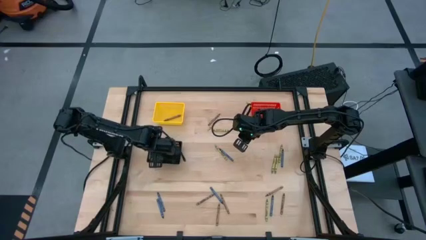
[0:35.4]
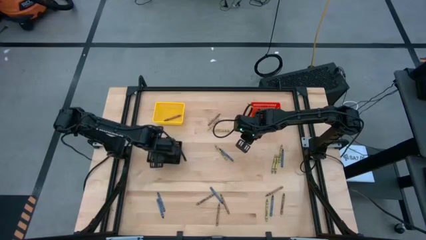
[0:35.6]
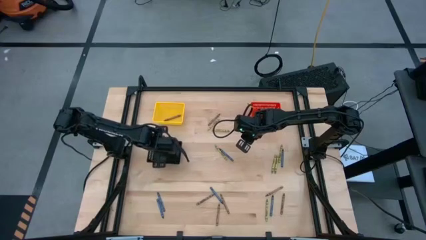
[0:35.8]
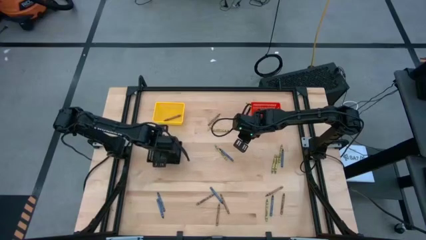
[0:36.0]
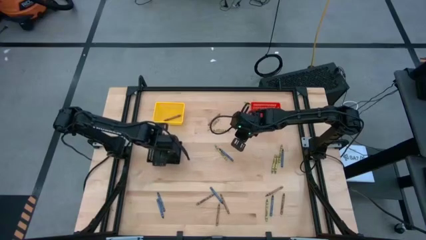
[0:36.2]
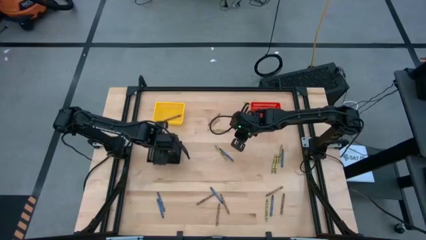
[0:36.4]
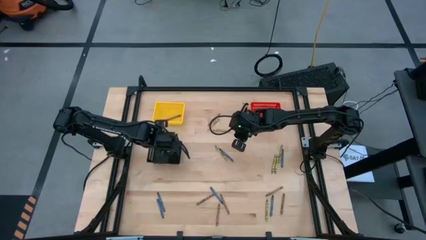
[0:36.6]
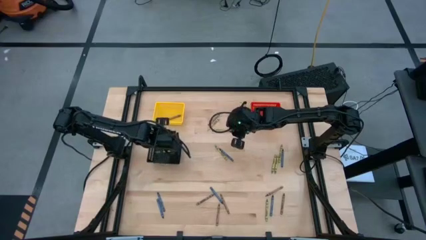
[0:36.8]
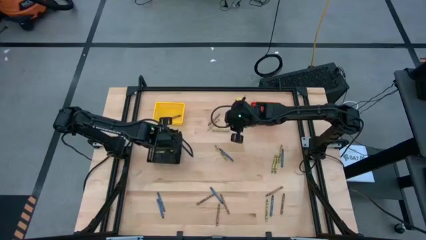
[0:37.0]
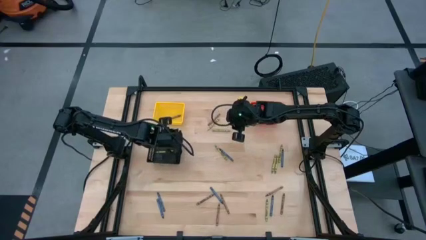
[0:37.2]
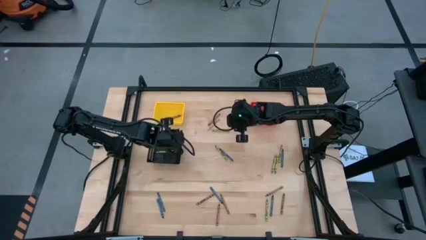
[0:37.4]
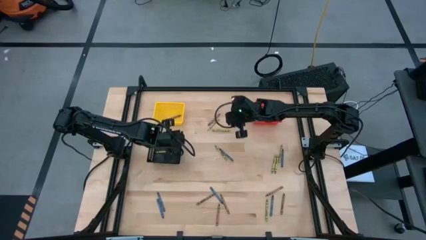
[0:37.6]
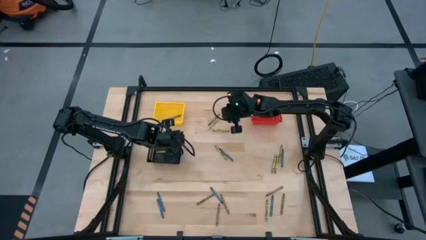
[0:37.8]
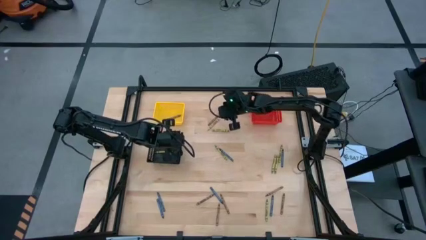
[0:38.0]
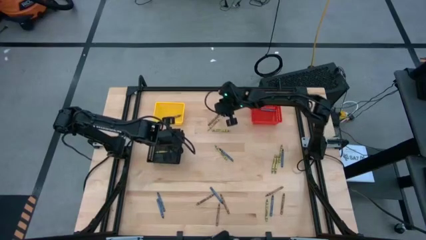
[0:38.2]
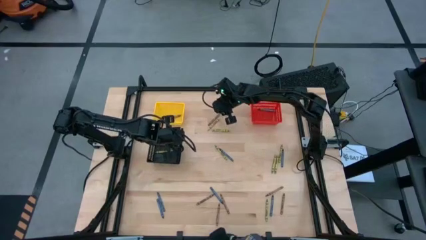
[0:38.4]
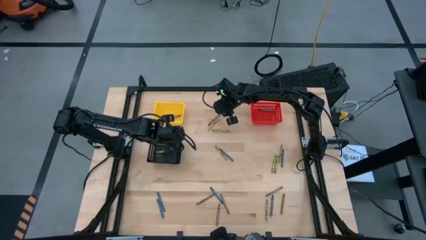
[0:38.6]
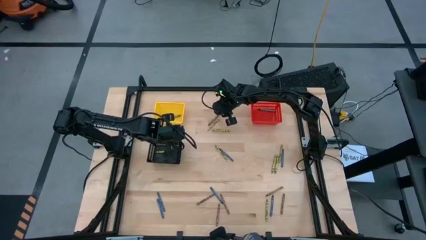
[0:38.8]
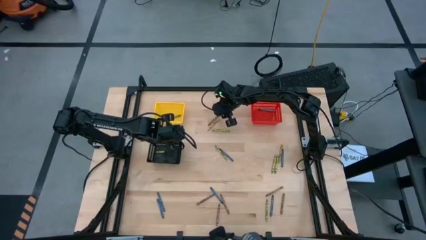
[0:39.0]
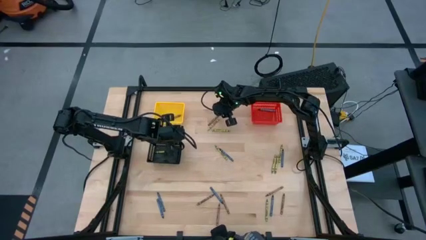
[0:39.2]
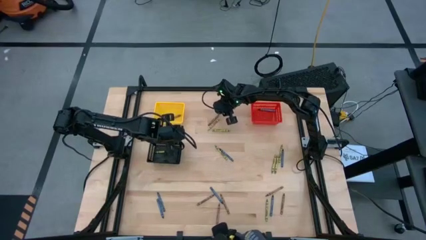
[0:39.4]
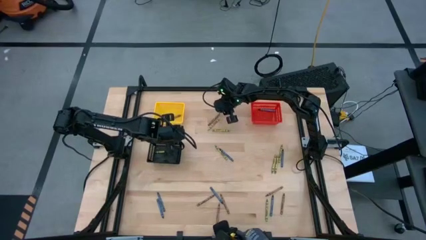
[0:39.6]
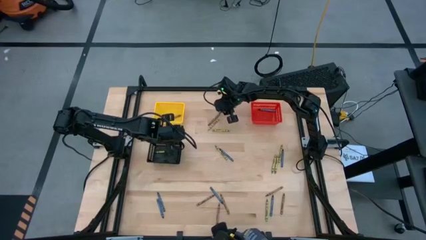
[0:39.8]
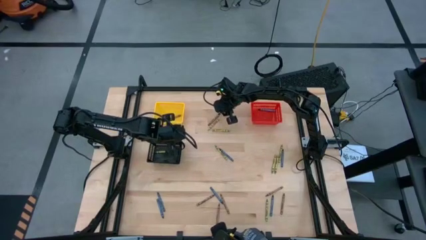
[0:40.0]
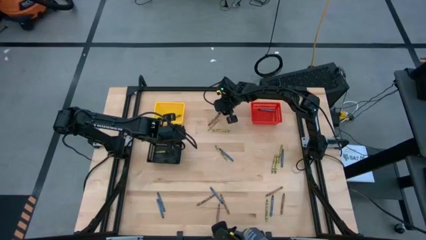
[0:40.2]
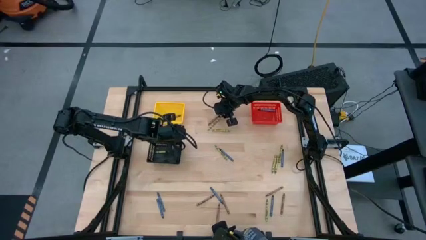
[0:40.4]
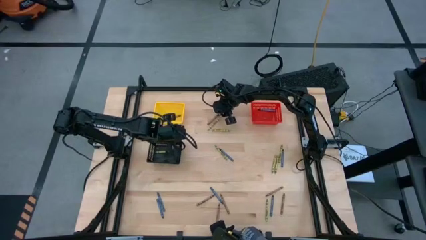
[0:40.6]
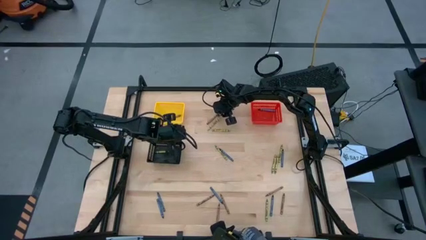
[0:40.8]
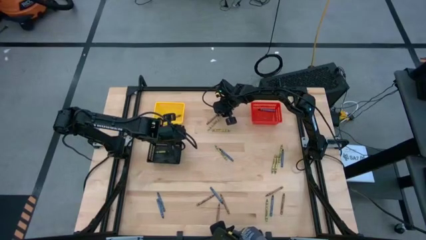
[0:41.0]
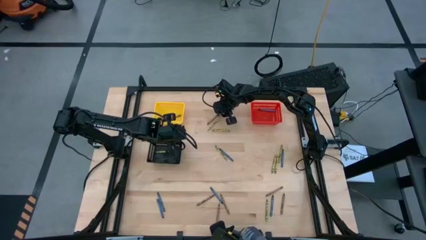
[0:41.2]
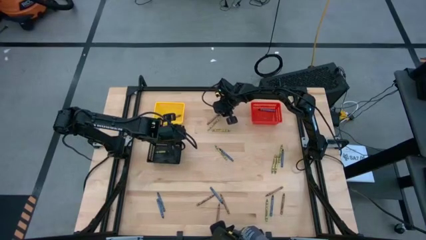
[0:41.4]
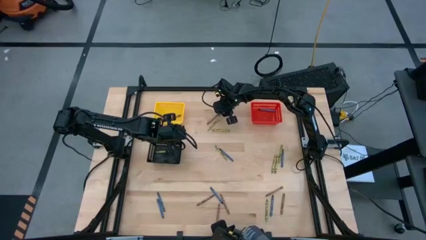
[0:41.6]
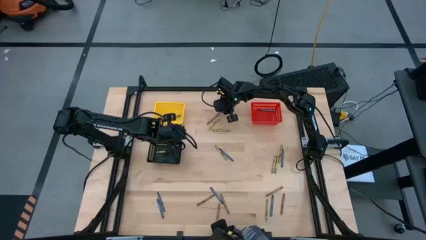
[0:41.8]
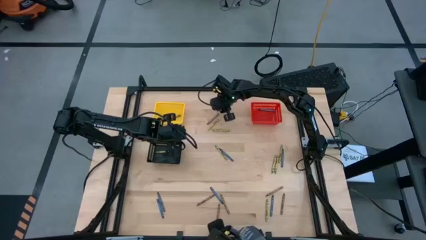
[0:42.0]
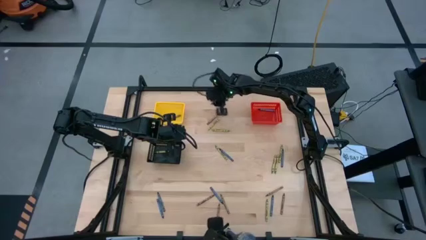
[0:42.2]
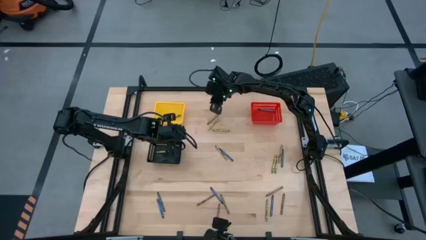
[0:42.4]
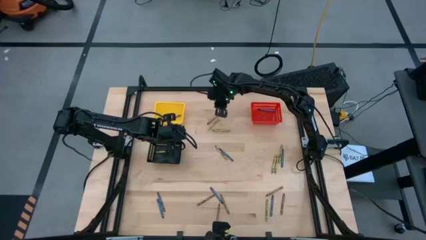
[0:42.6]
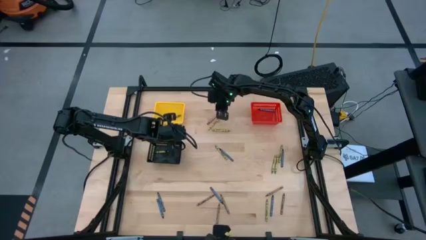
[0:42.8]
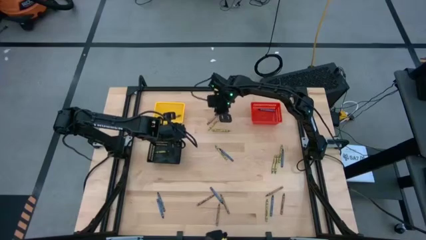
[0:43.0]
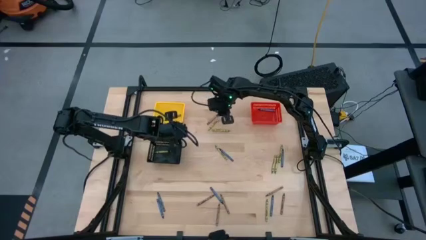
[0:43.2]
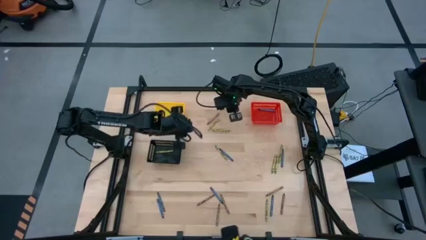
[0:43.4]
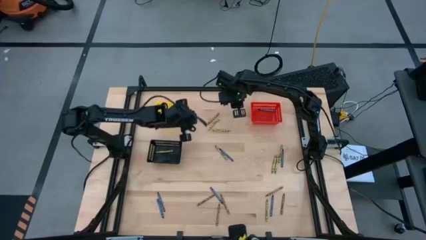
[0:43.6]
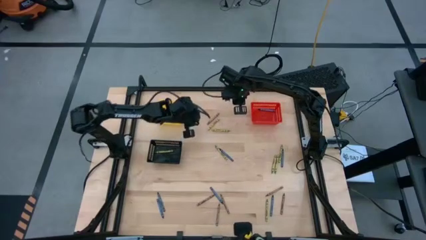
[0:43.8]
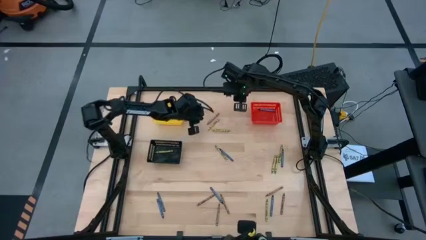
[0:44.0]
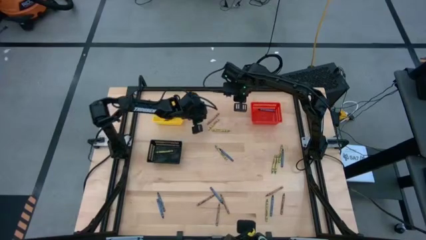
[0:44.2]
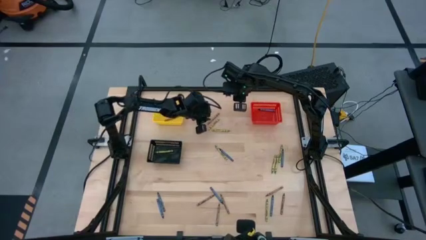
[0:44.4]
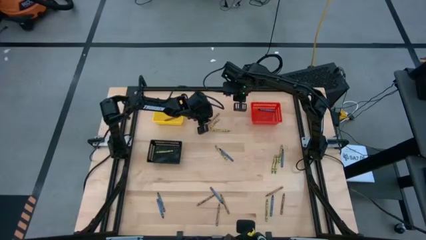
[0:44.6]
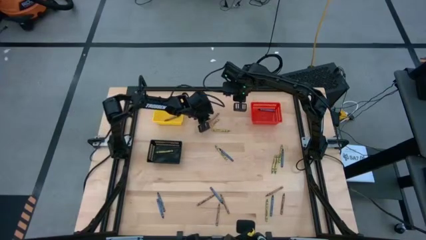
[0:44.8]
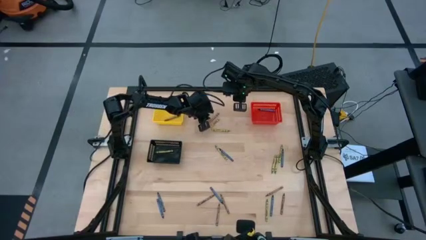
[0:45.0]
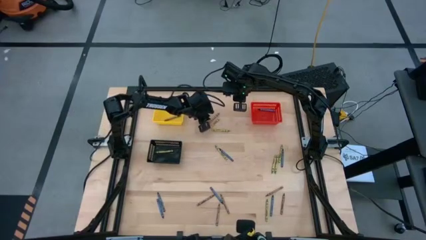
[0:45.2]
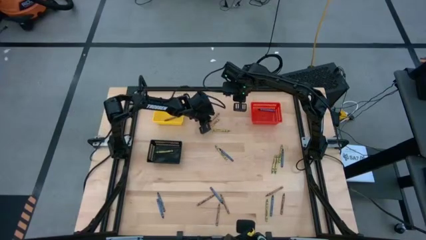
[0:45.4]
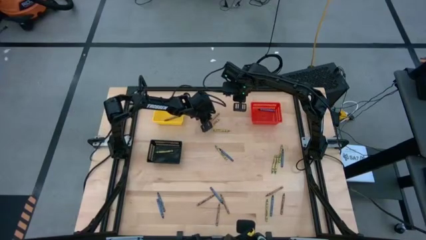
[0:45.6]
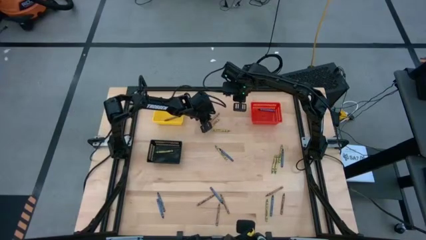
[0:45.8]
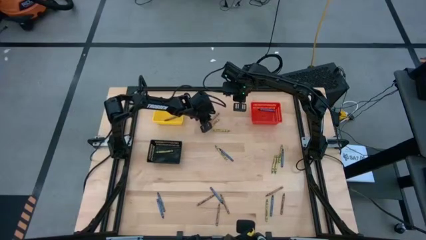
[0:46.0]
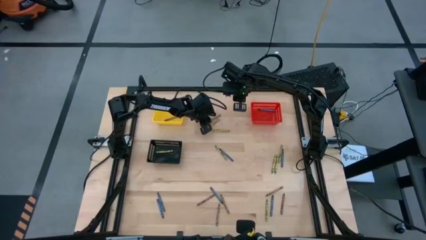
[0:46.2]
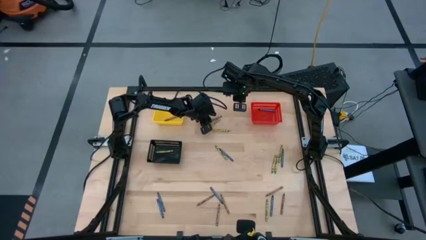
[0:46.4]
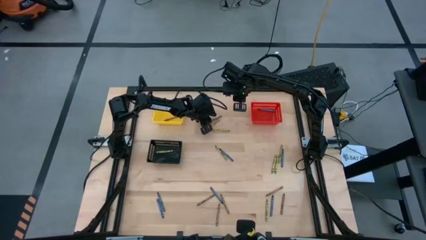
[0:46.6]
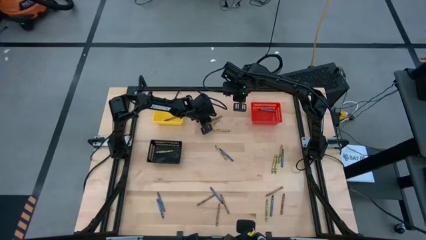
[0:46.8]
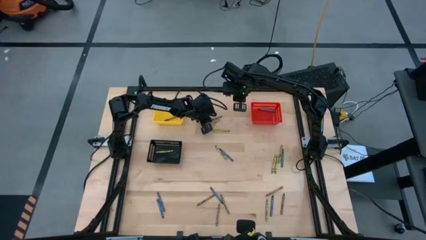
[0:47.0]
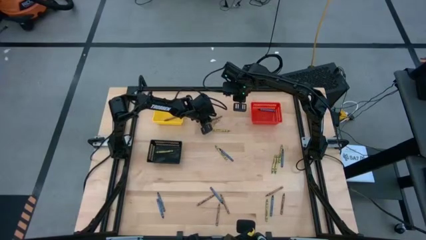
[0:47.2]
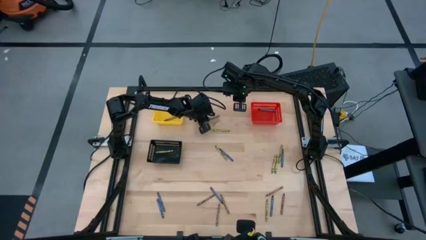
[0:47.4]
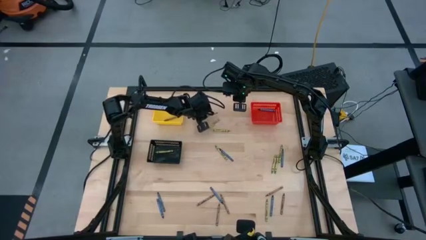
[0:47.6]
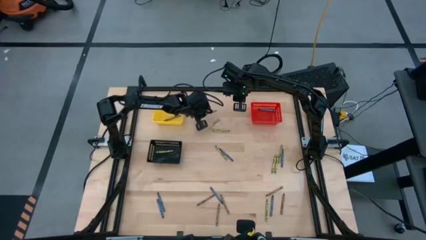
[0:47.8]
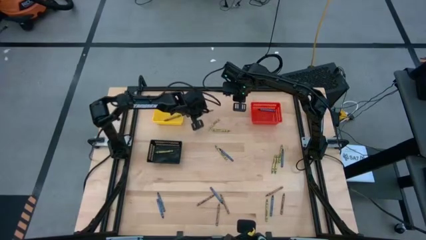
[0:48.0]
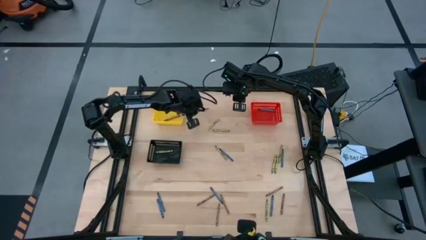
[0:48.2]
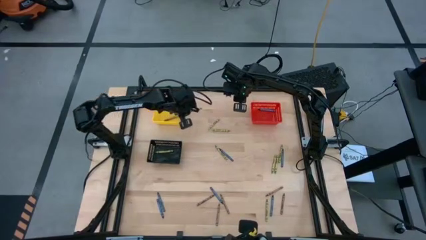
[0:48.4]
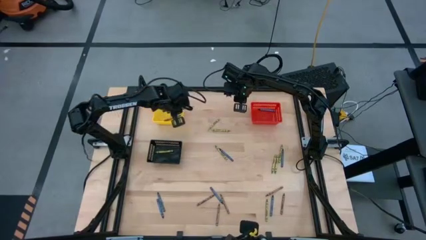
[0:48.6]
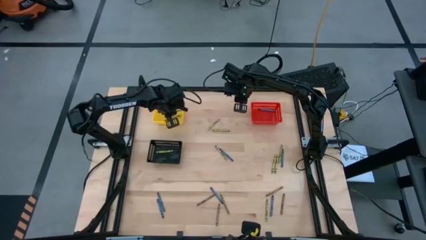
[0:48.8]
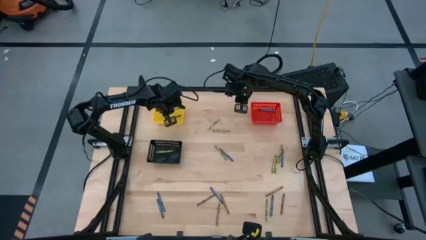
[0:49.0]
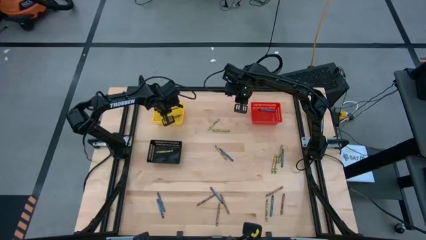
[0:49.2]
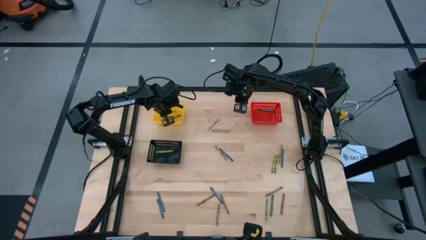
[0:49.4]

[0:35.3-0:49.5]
Task: Sort crayons
Put the brown crayon into the yellow bin
